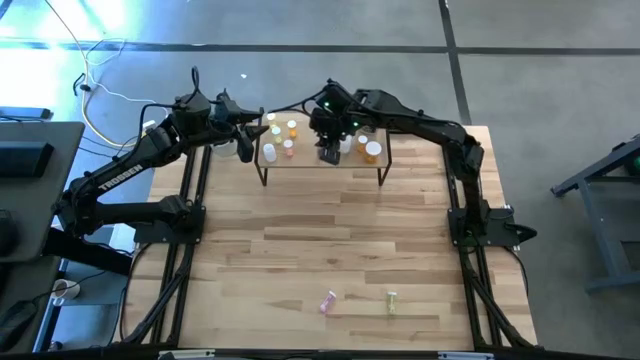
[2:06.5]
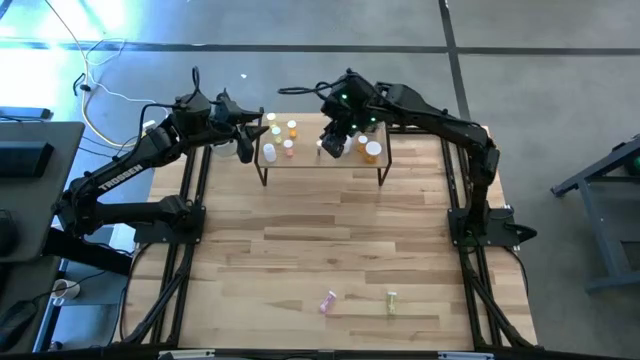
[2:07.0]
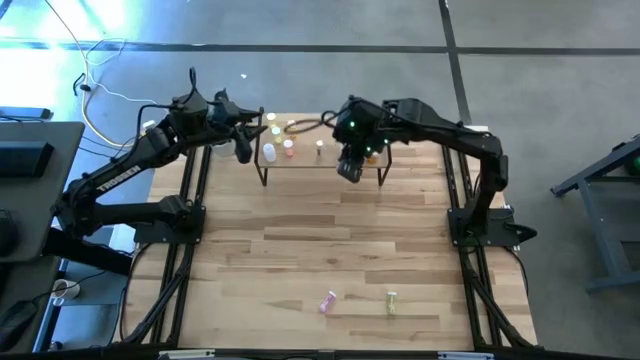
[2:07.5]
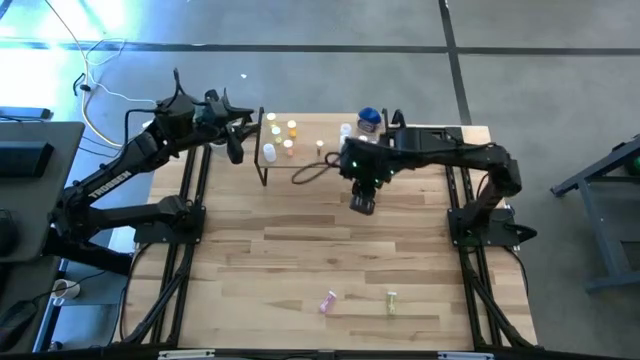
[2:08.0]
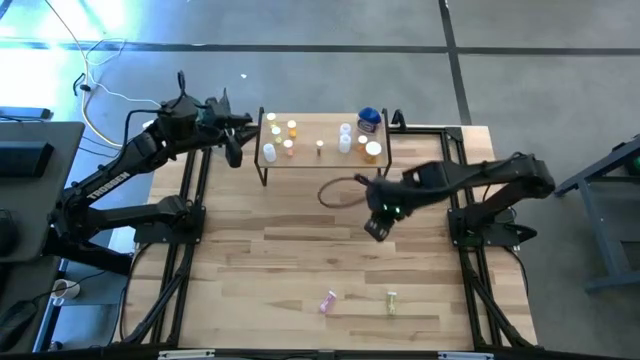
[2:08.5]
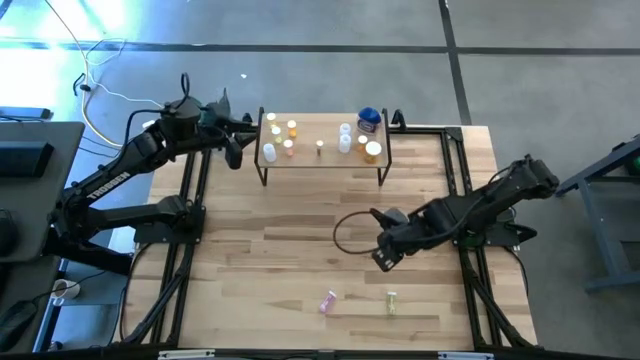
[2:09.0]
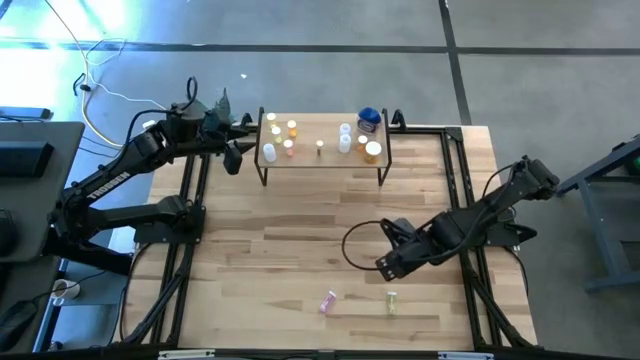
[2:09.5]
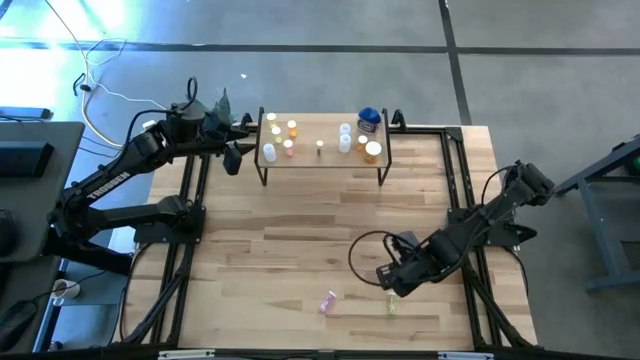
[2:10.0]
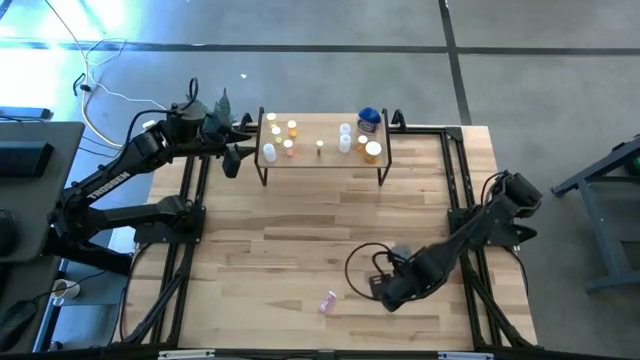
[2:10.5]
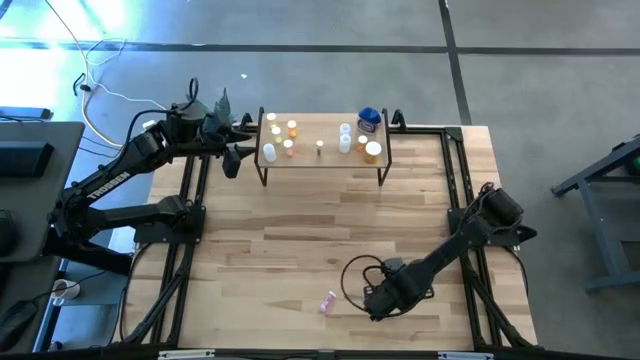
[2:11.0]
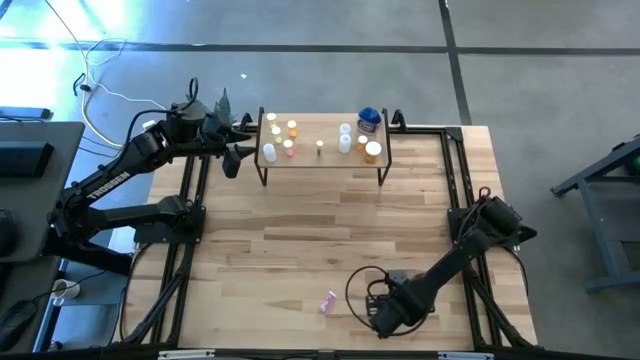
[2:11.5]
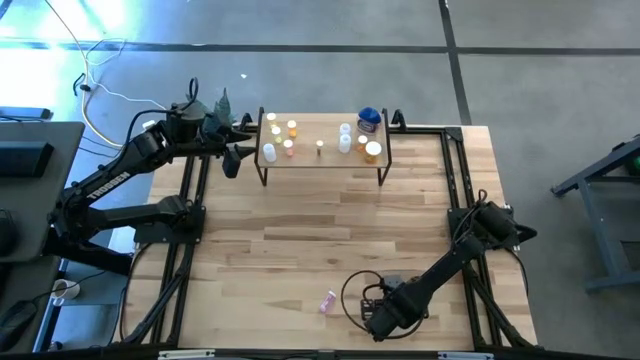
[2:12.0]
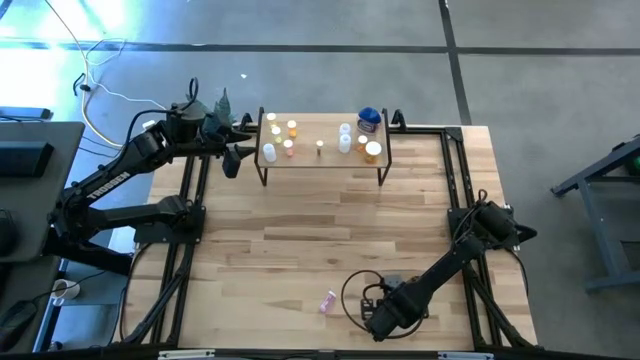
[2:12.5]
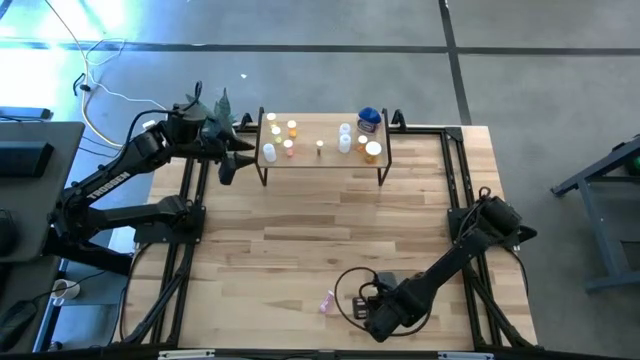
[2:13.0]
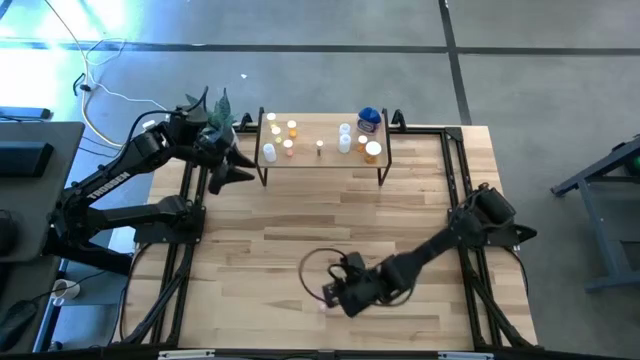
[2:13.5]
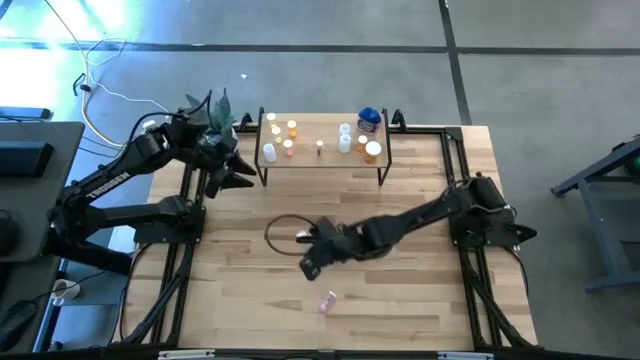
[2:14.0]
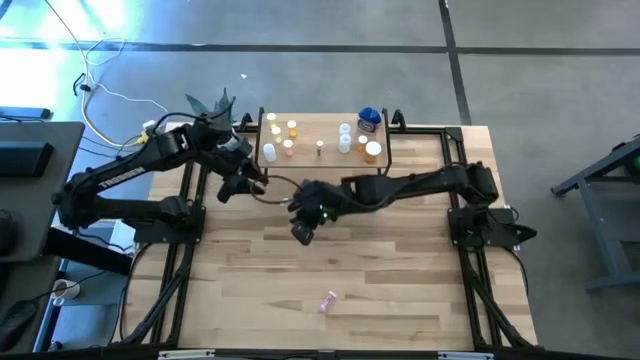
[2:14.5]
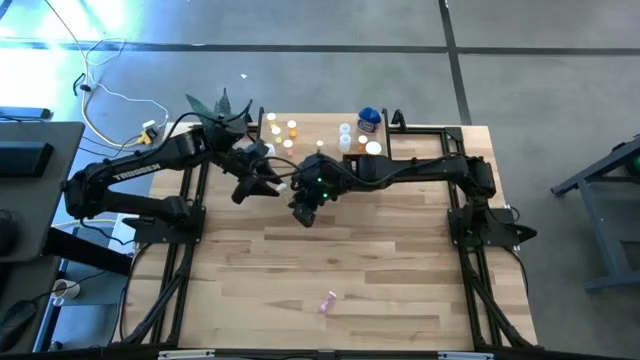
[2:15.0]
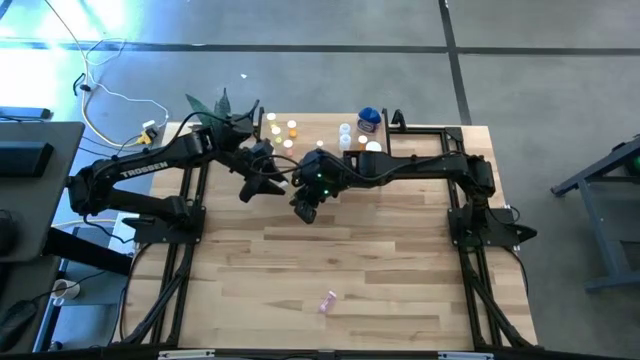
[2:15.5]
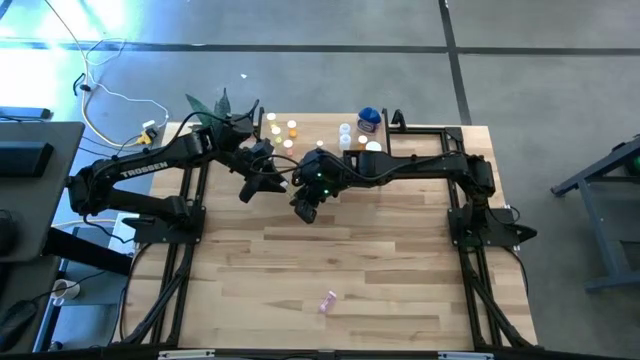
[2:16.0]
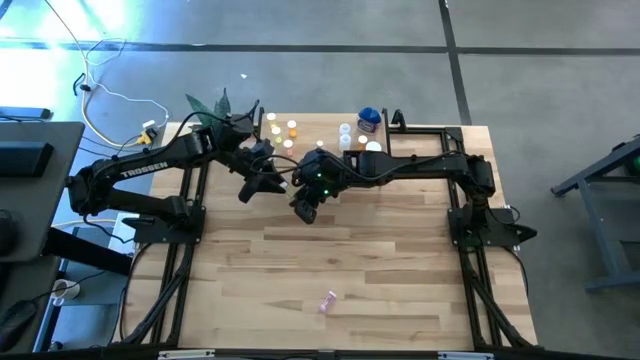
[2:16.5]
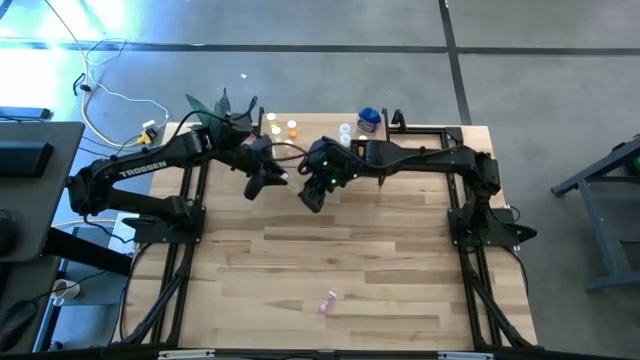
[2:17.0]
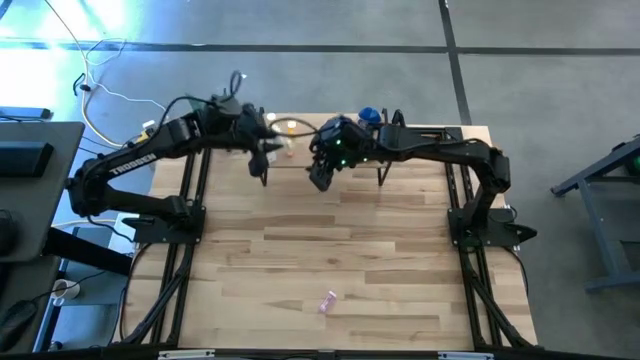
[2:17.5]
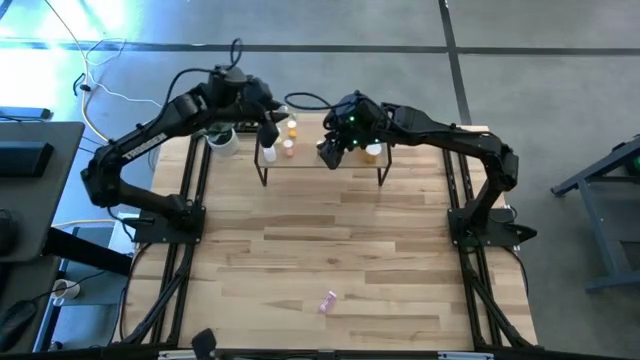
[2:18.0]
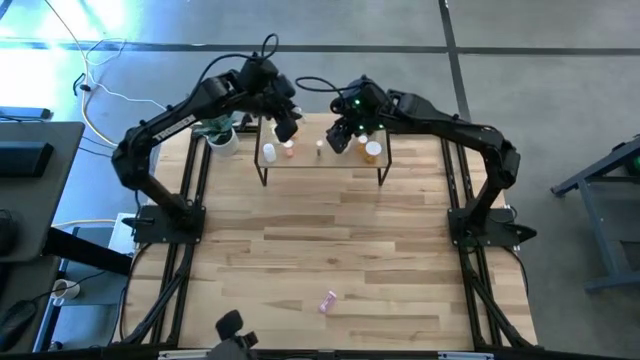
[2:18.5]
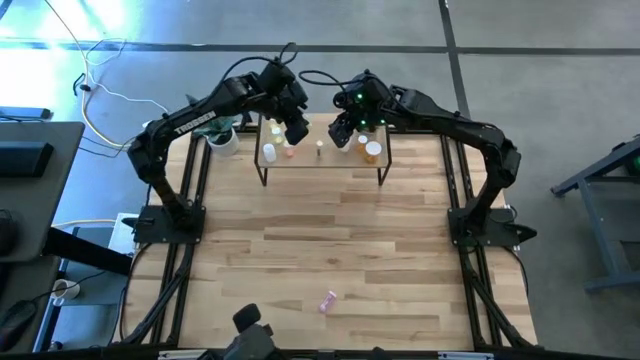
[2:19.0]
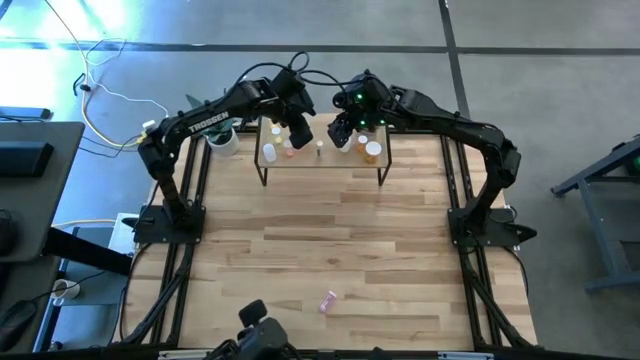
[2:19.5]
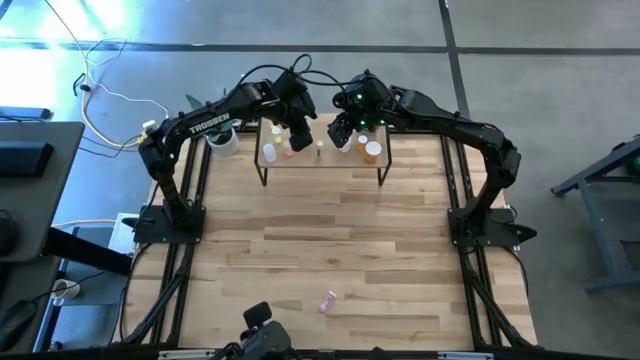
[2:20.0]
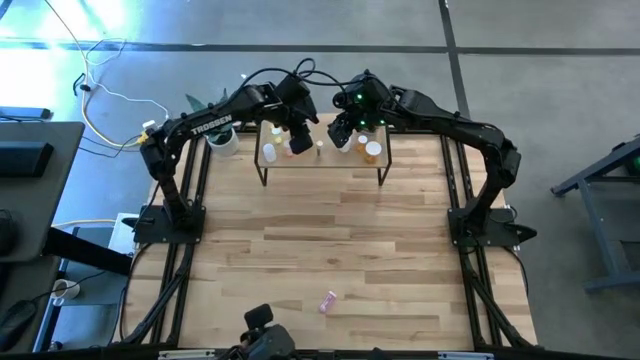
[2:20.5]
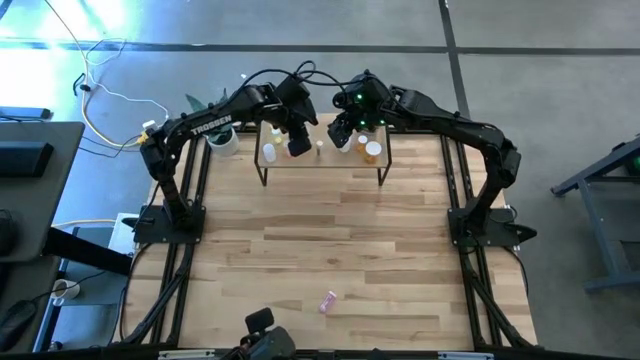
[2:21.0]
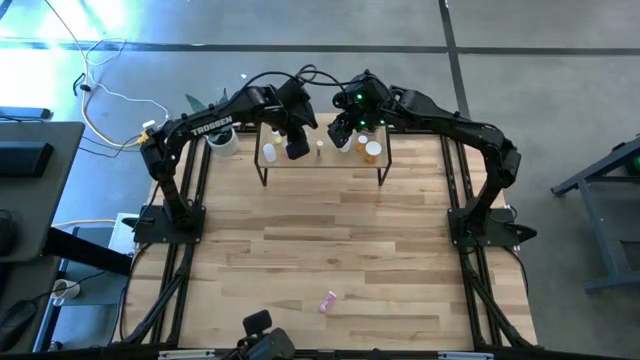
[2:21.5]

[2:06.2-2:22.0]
Task: Pick and place medicine bottles onto shelf by color
Put the small yellow pill bottle on the shelf

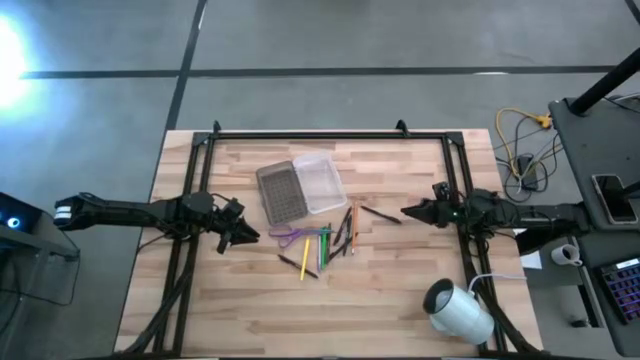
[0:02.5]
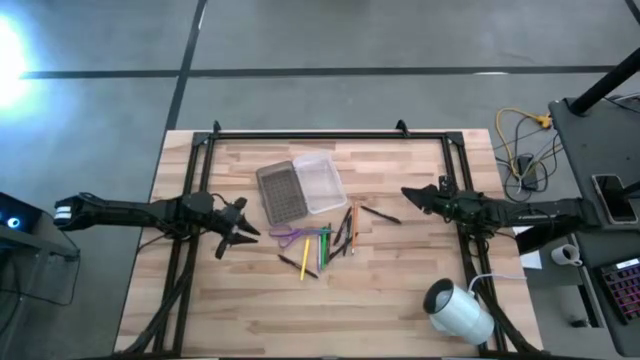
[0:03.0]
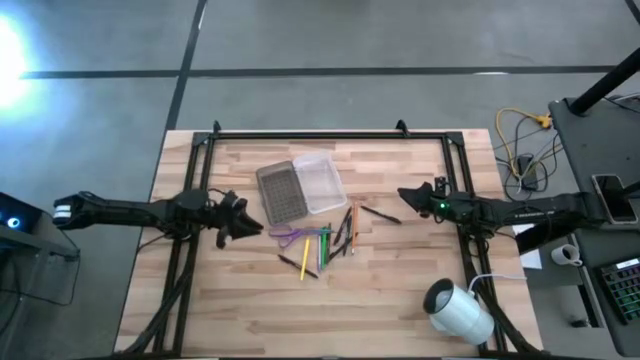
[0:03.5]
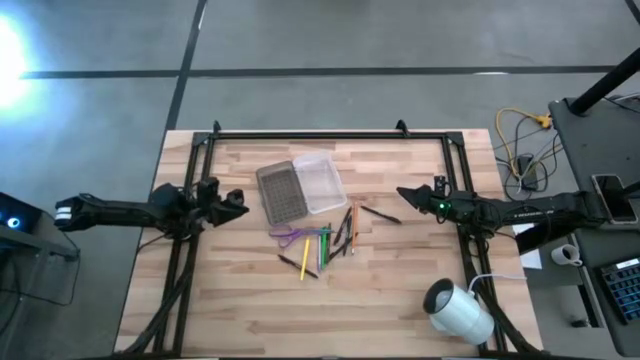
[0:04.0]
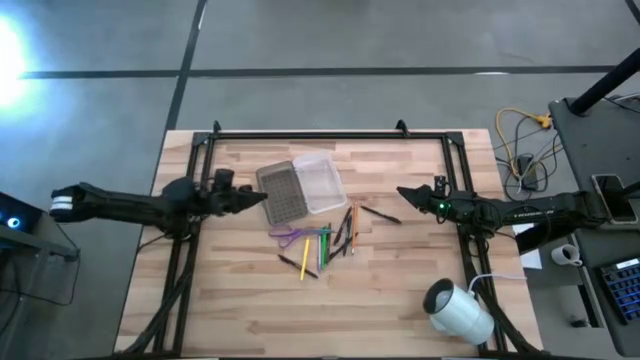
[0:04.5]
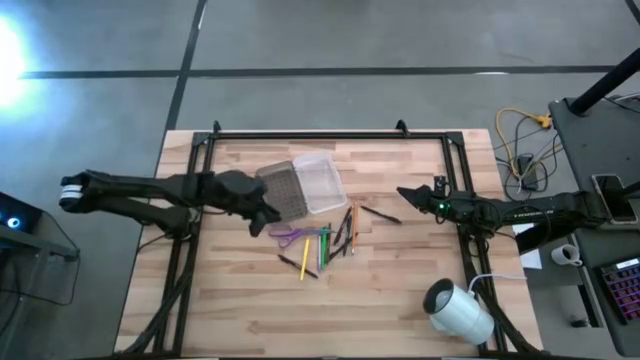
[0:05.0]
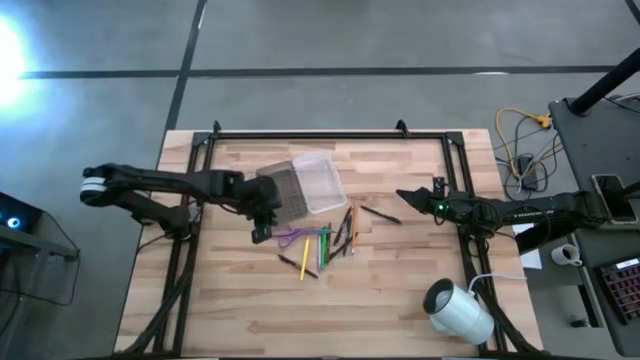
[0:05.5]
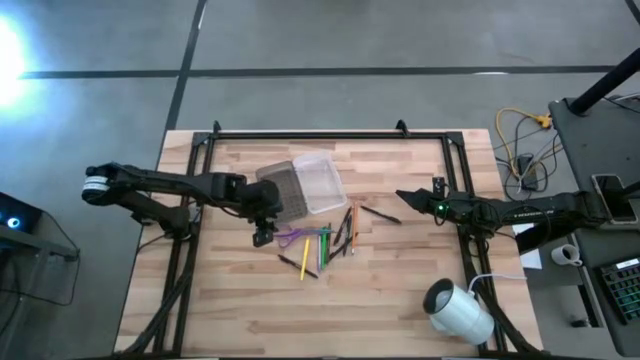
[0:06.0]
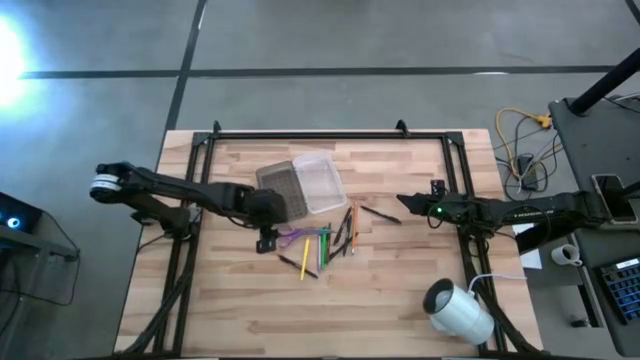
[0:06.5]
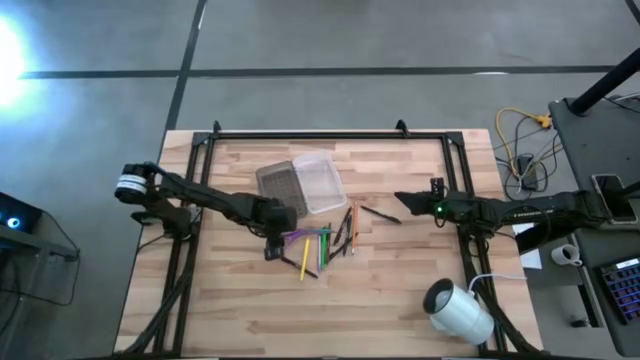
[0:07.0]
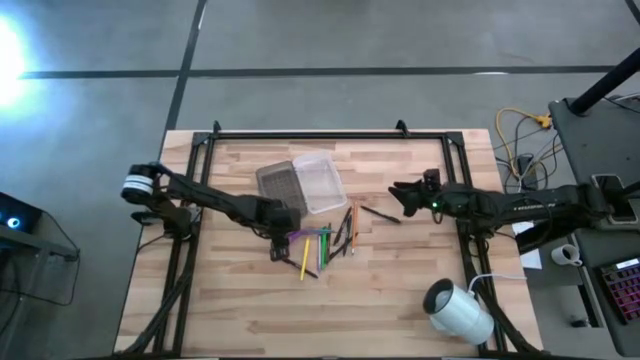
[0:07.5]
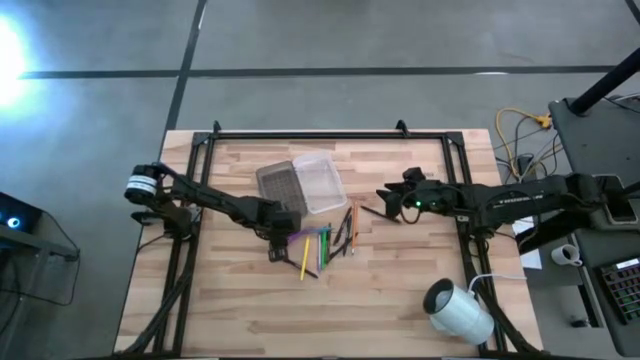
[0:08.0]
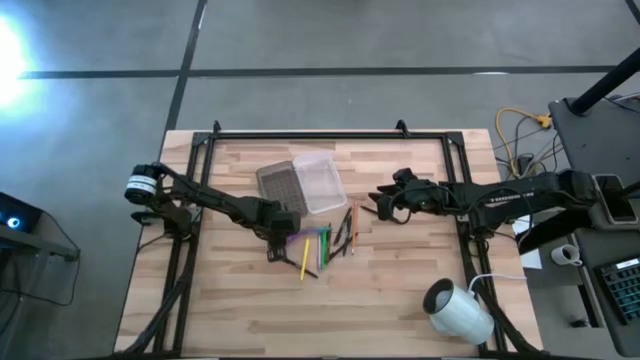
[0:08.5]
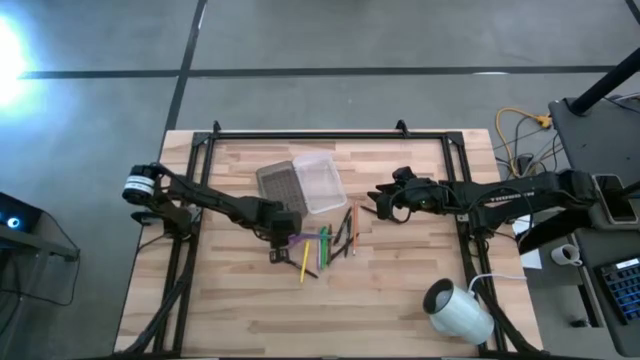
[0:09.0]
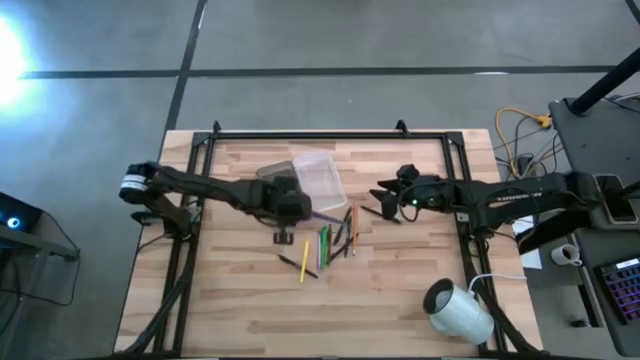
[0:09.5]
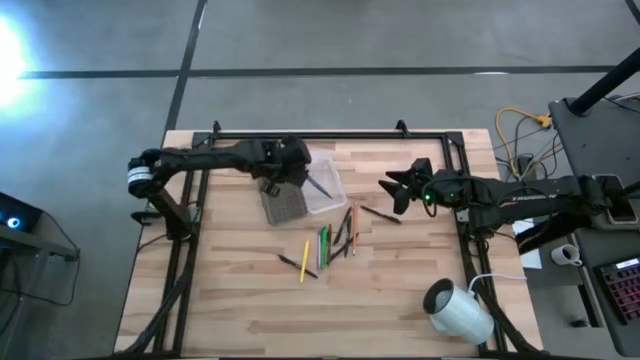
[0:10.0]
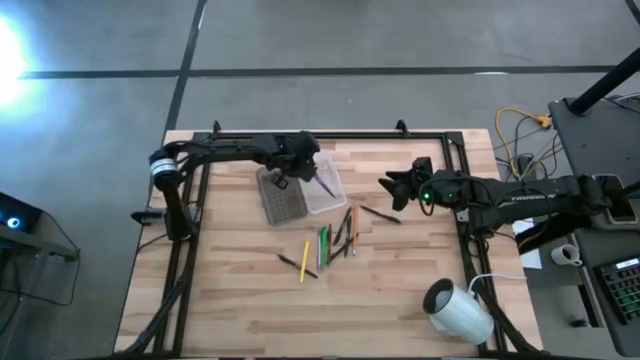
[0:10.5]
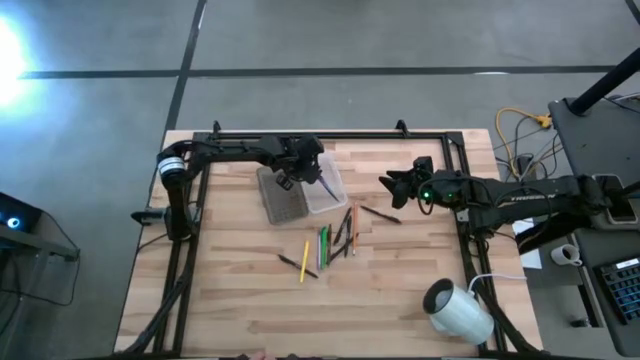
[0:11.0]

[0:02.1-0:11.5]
Task: Pick & place school supplies into a supply box
Put the violet scissors into the supply box
